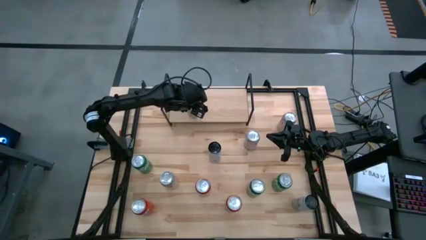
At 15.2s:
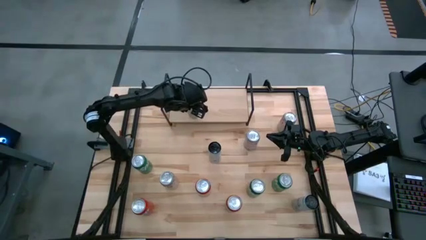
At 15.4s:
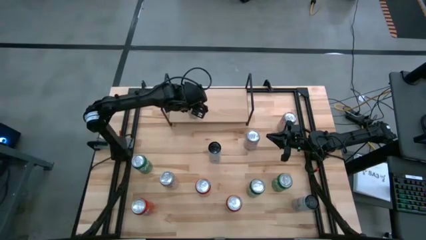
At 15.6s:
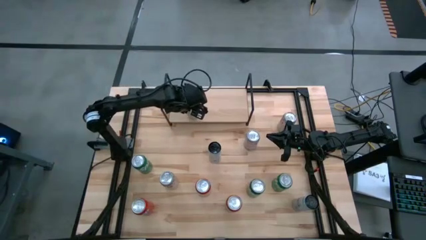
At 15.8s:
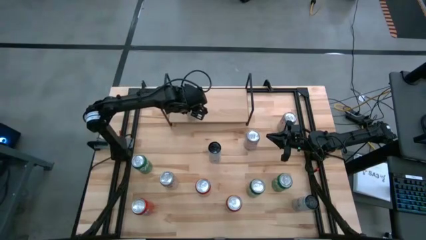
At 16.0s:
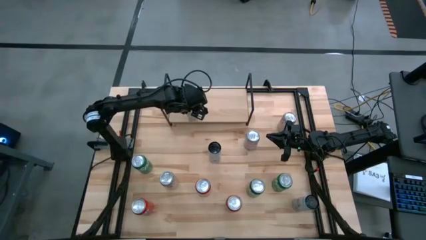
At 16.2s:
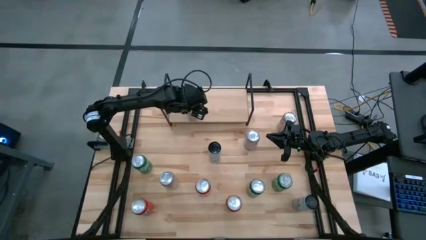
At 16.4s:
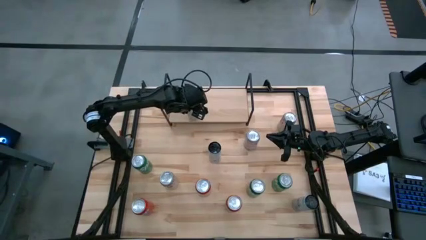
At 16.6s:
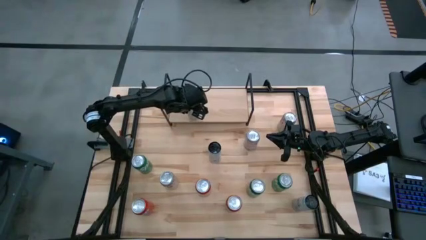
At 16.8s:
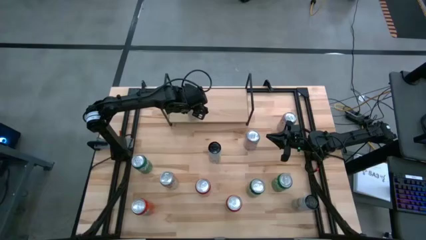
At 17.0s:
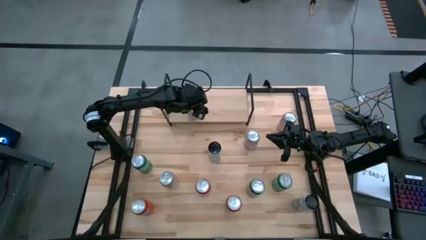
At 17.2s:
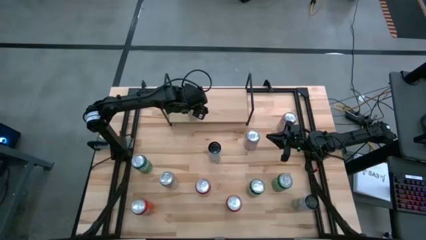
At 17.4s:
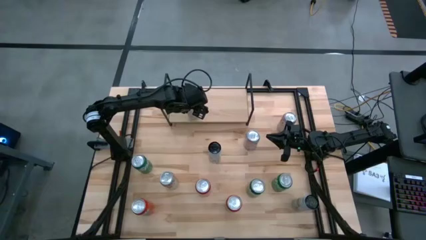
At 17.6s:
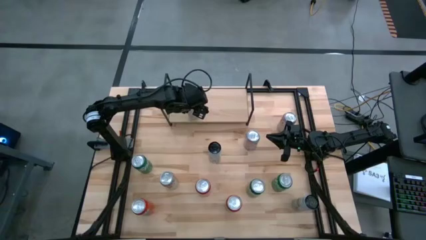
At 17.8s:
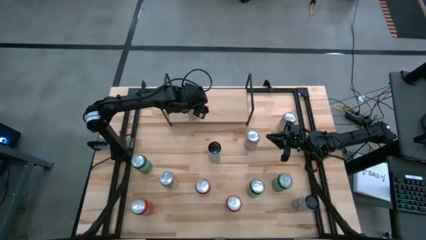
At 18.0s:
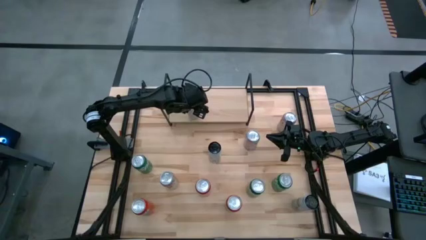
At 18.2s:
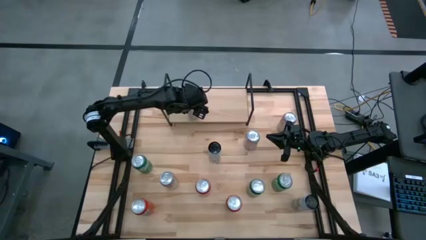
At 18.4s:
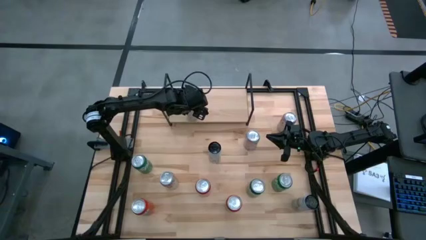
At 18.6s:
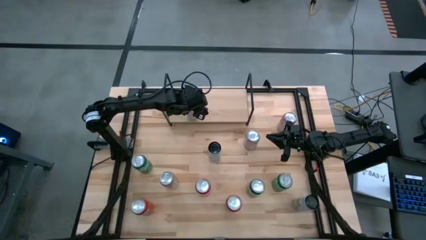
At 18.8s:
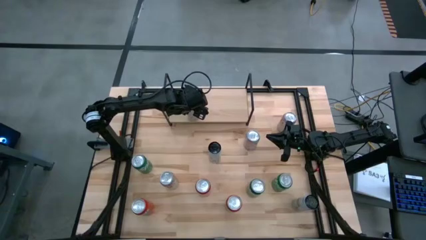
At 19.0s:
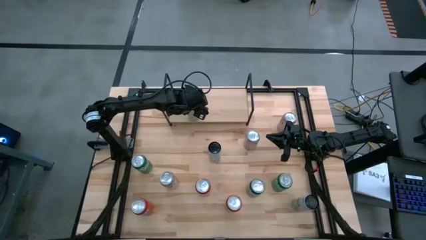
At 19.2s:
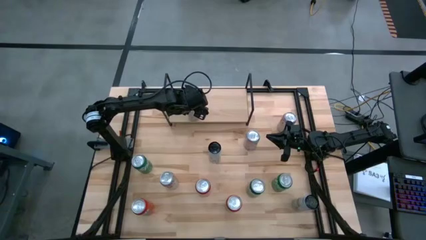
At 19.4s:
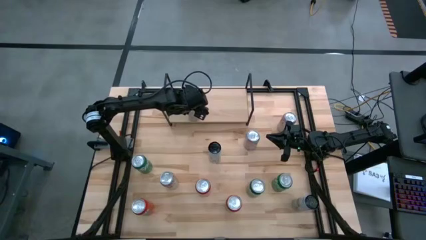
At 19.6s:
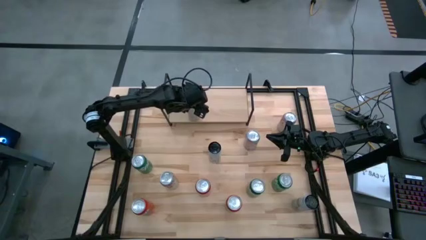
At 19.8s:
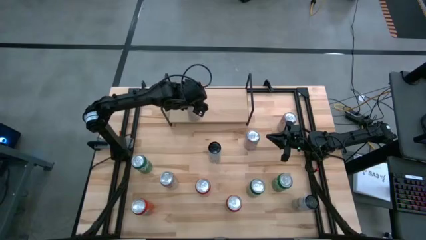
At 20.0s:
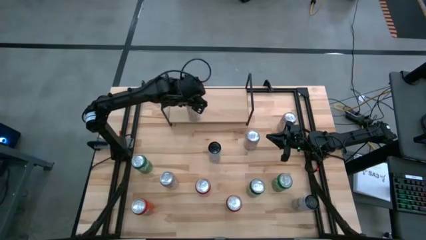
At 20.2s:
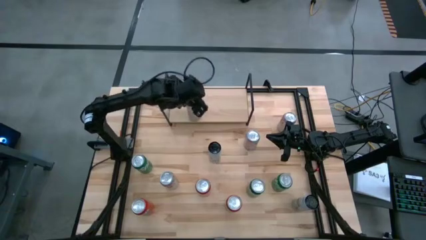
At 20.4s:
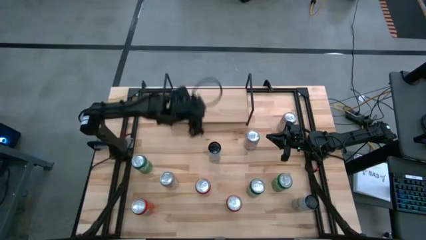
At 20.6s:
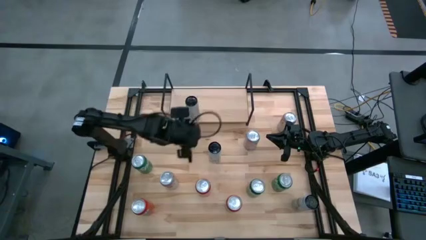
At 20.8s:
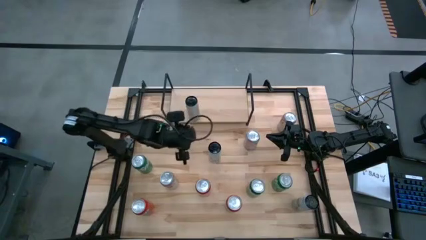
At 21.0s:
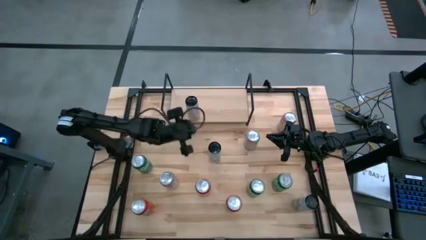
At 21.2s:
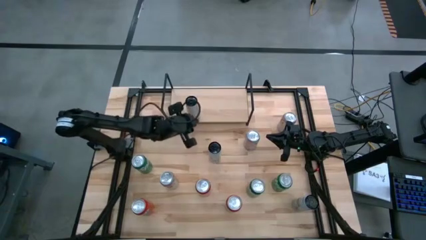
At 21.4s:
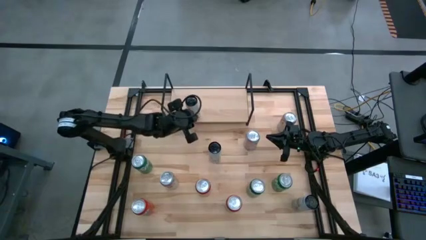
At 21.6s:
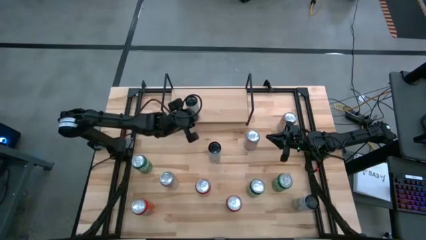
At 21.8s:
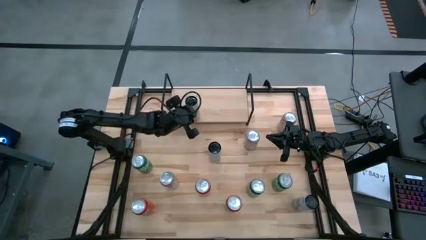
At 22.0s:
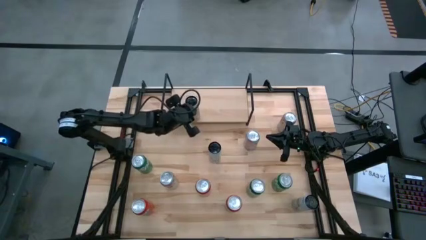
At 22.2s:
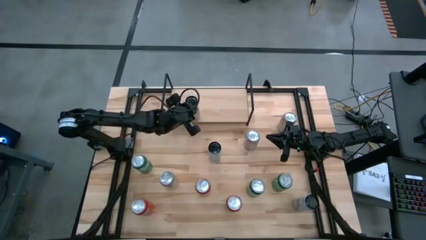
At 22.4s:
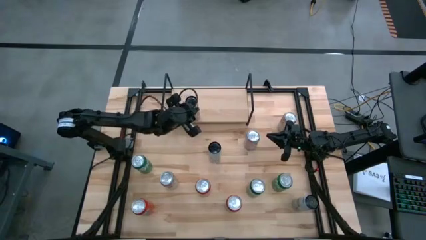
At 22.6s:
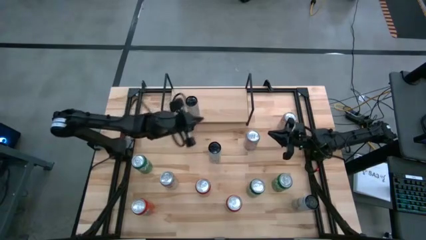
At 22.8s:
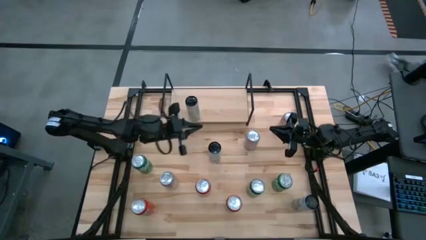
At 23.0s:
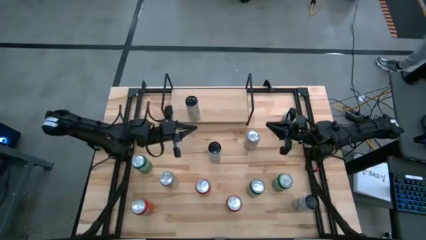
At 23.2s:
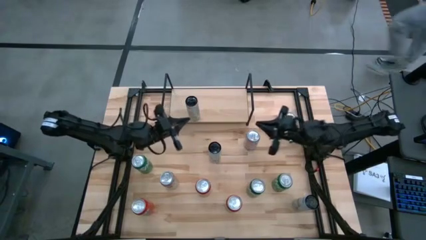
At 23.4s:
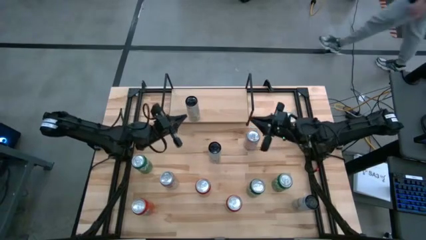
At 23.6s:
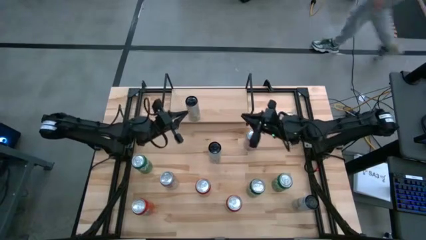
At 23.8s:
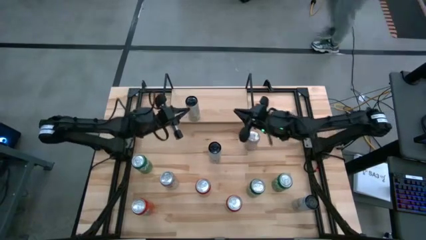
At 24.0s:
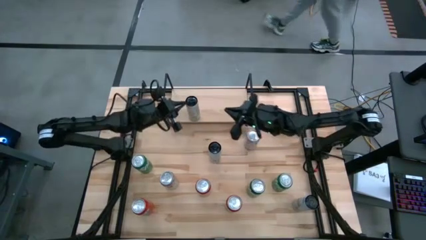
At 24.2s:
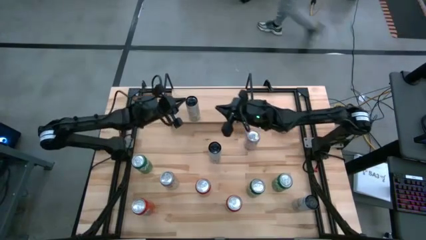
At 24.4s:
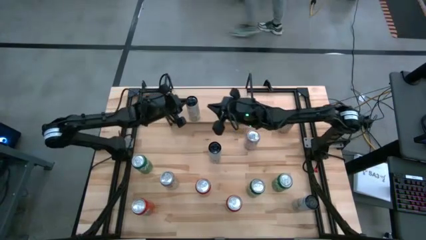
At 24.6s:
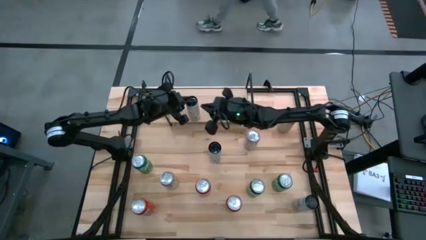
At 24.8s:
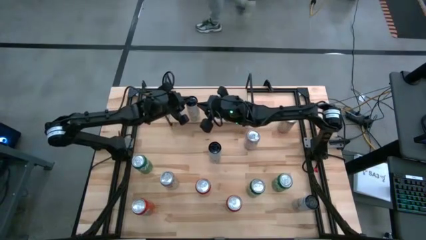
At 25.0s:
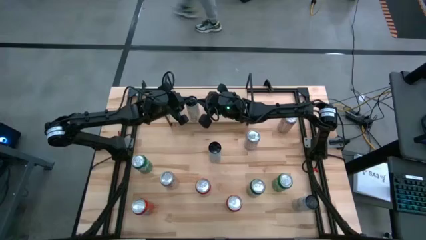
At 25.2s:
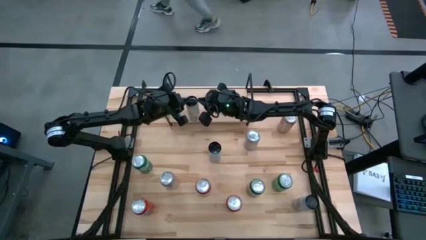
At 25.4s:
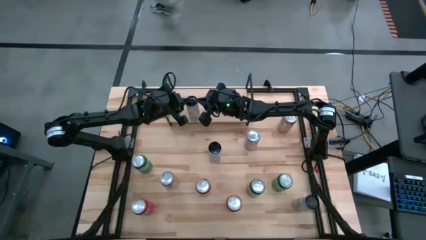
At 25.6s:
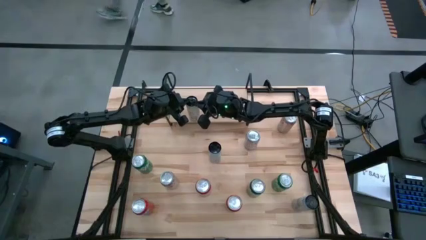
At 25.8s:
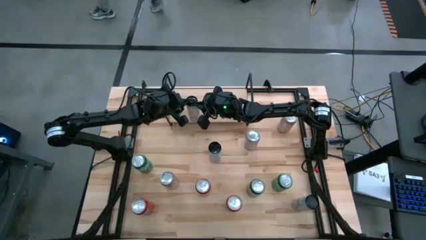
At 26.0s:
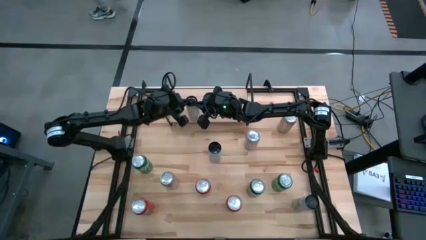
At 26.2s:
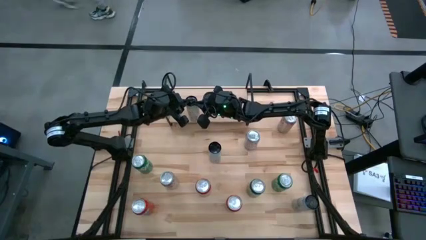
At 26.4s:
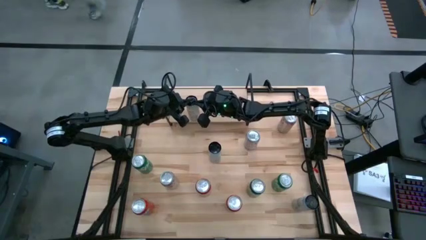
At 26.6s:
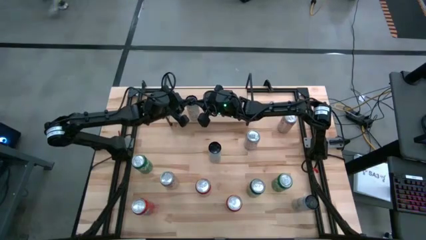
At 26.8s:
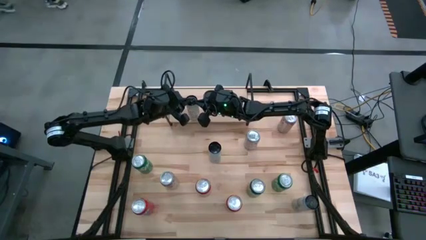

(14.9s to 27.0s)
Task: Sort soda cans
Put the white yellow soda can on the shelf
